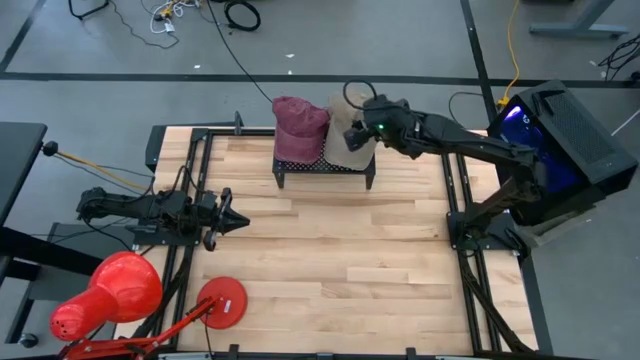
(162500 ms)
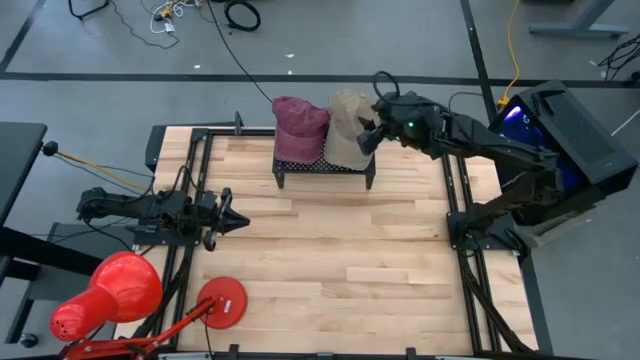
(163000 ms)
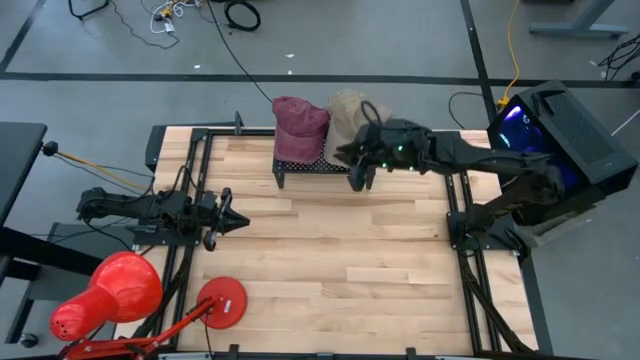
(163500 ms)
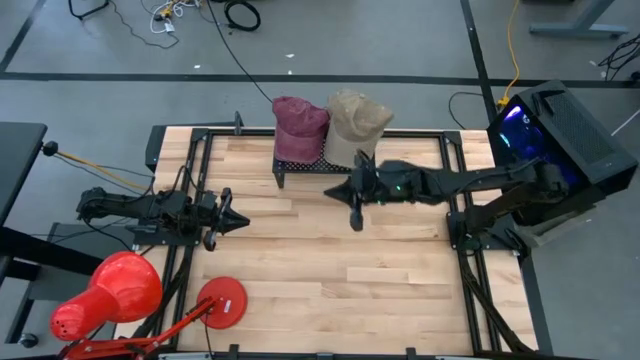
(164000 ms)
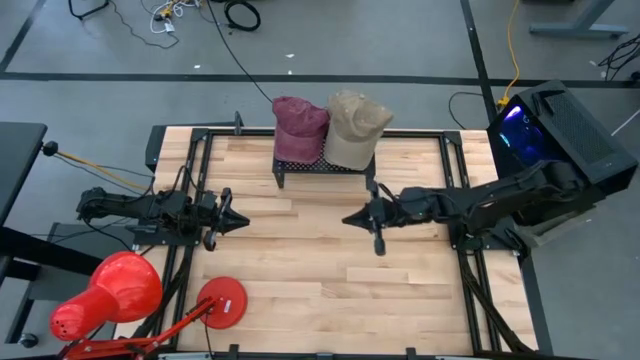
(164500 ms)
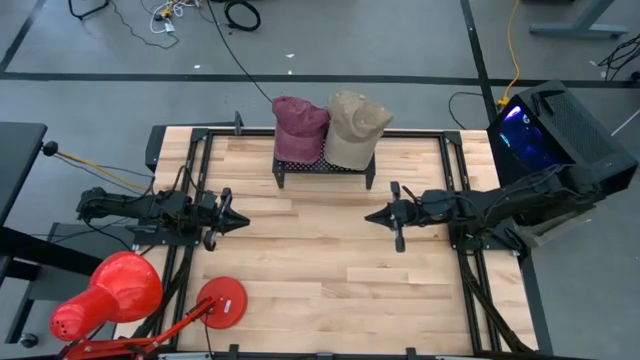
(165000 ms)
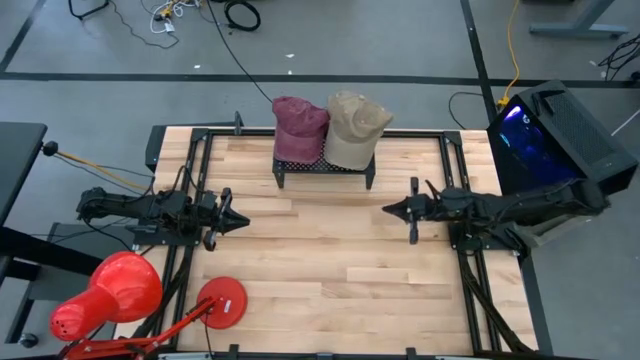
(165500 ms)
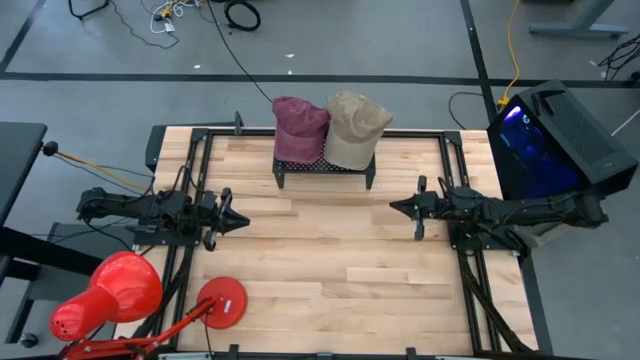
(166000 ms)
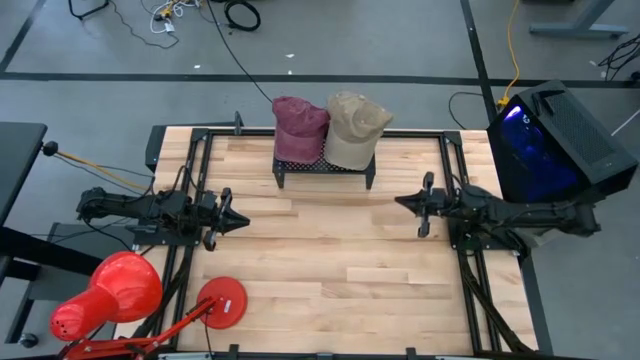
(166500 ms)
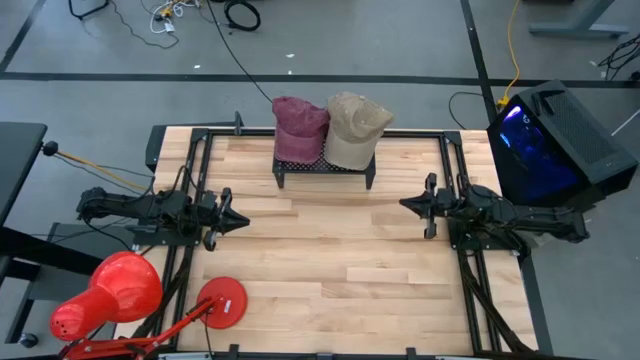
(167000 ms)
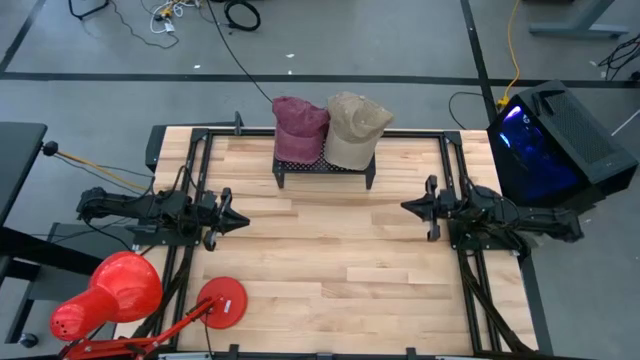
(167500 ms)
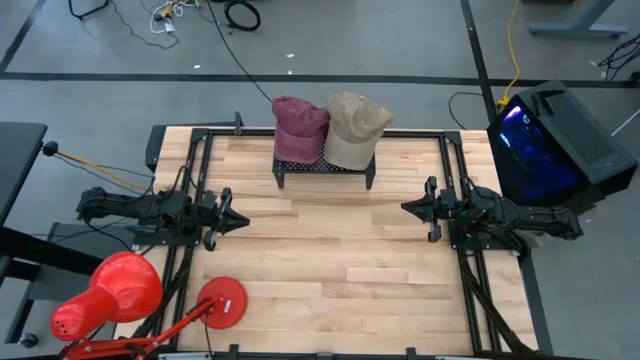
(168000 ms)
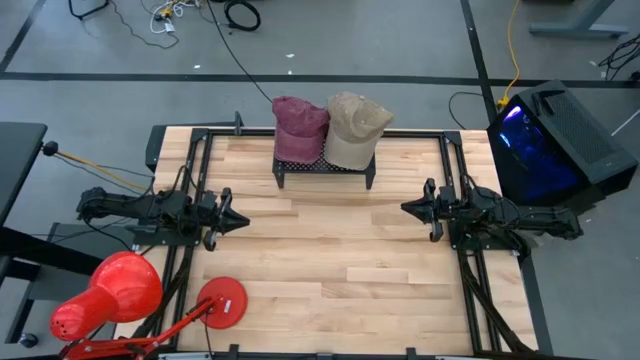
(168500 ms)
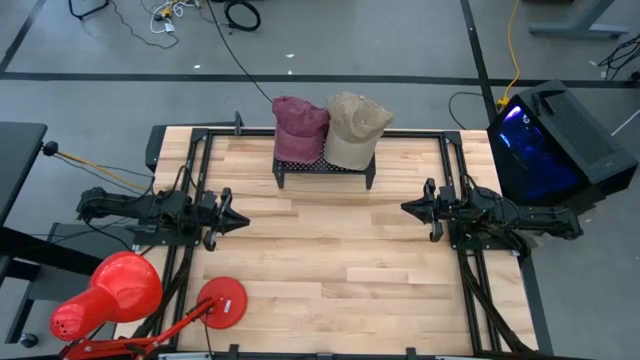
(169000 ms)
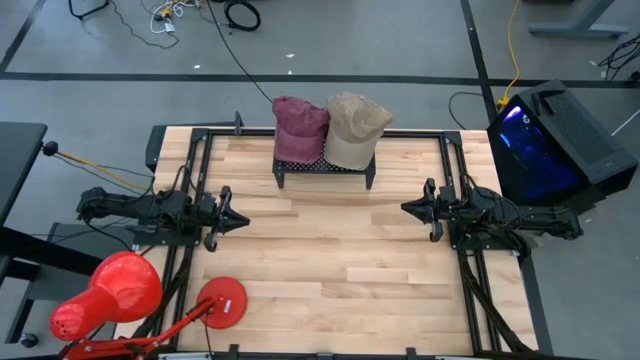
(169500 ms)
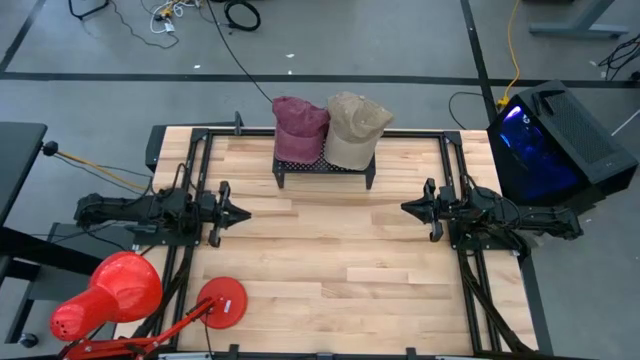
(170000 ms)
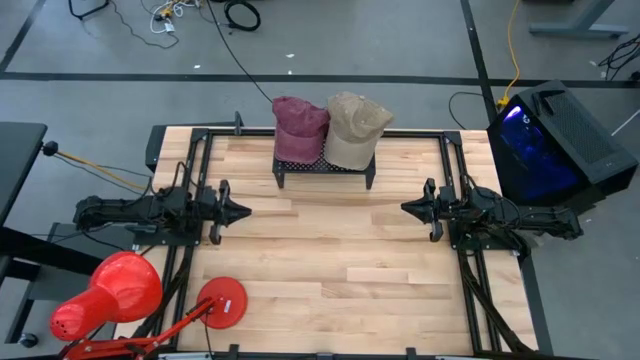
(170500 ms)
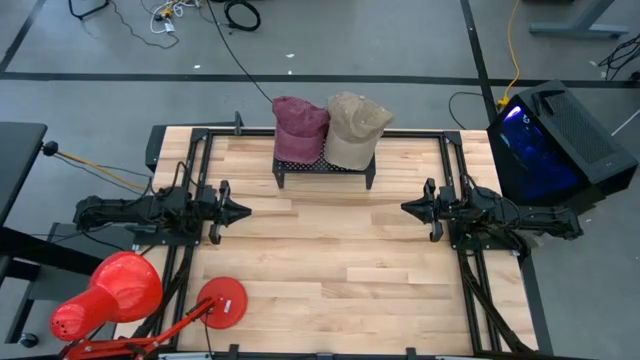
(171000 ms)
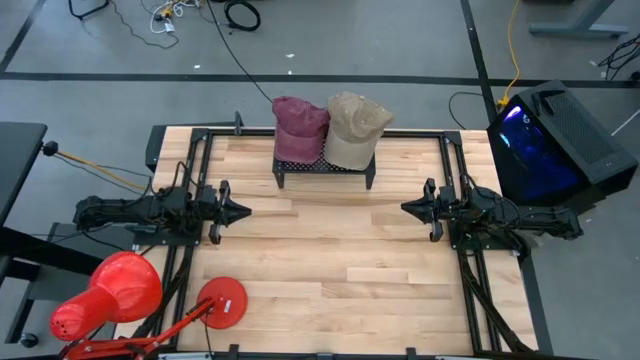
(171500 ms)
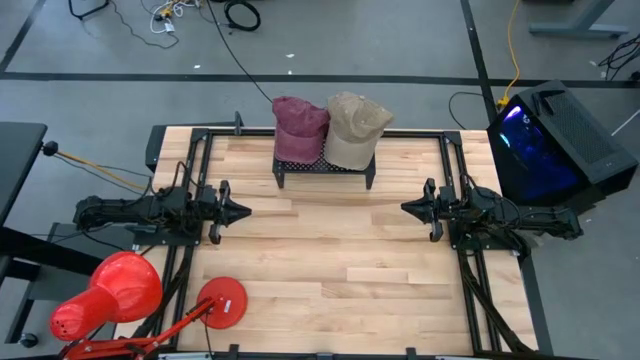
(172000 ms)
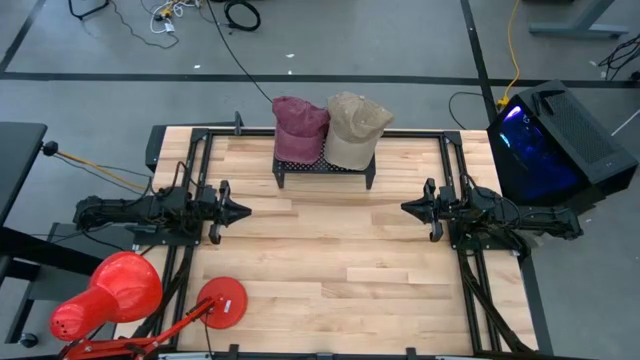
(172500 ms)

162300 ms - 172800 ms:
Task: Pick & Place hat
Return to Home Position

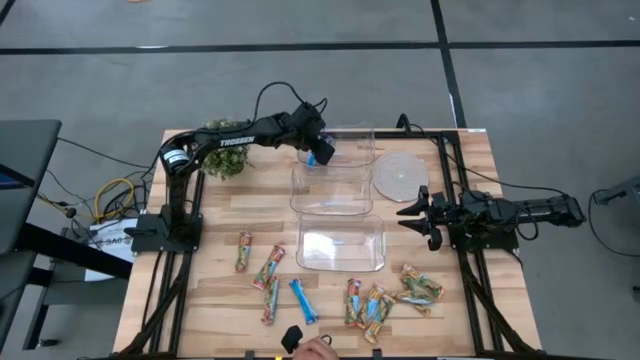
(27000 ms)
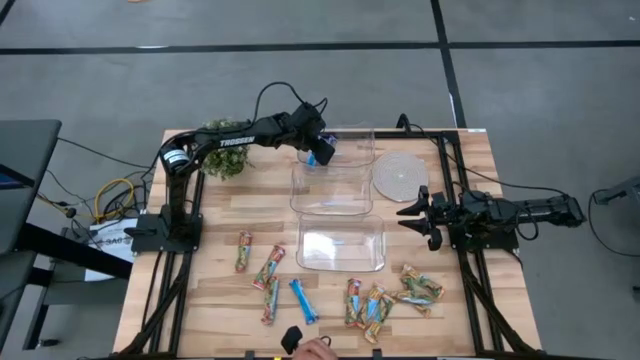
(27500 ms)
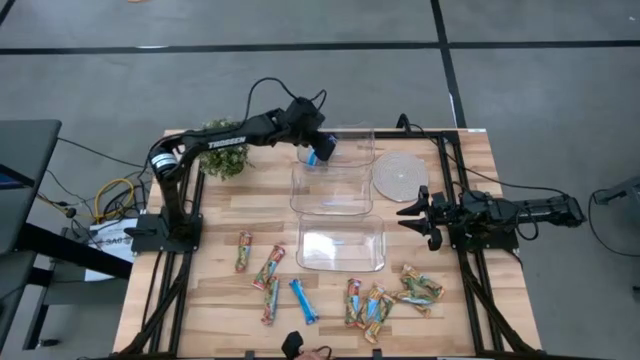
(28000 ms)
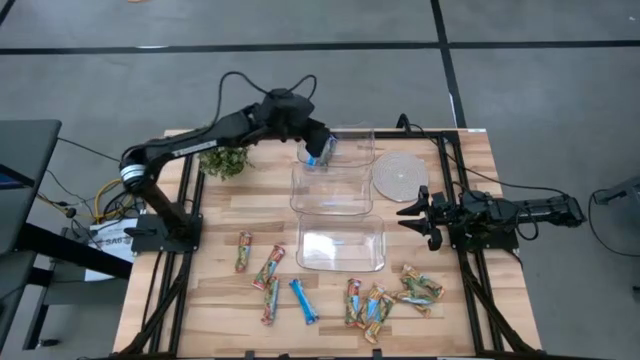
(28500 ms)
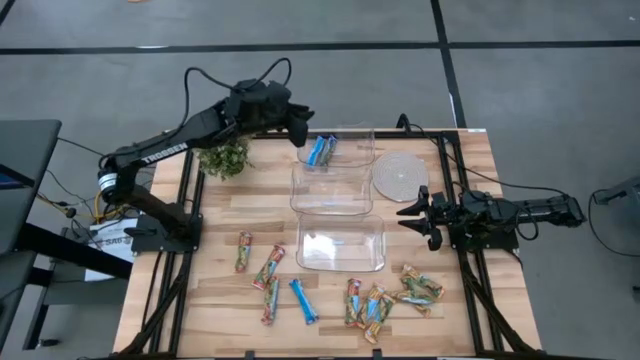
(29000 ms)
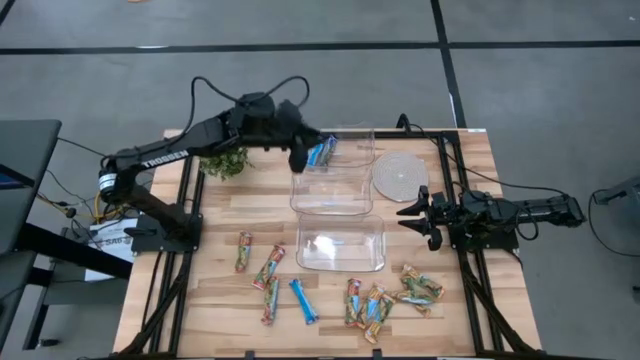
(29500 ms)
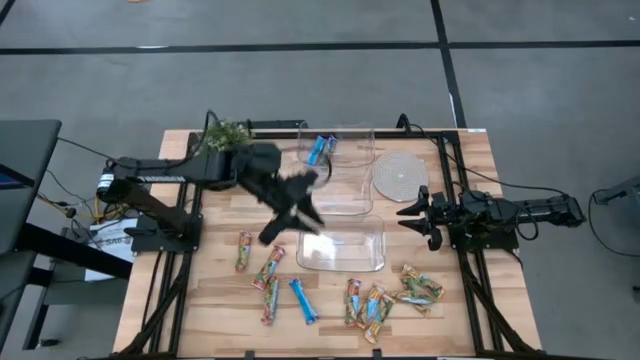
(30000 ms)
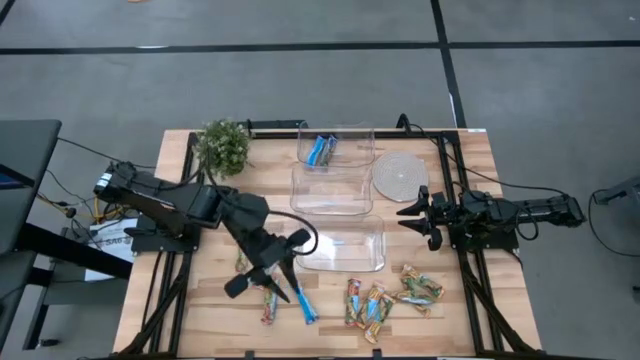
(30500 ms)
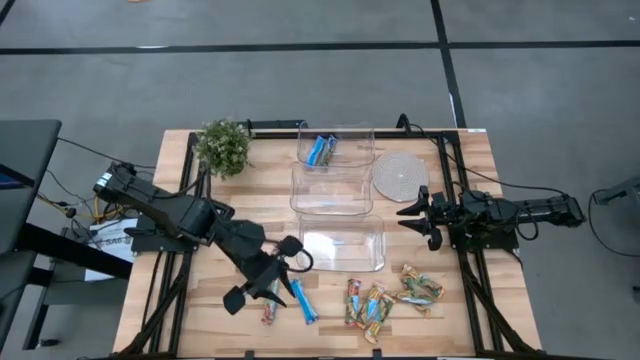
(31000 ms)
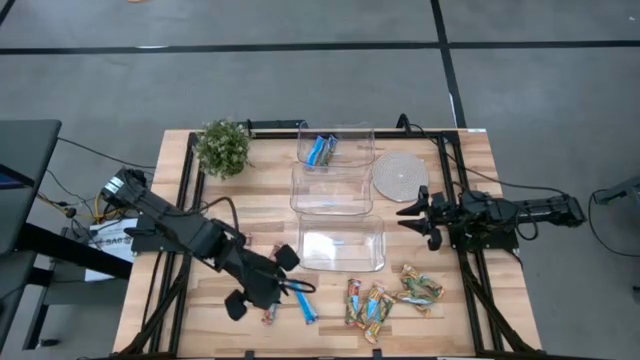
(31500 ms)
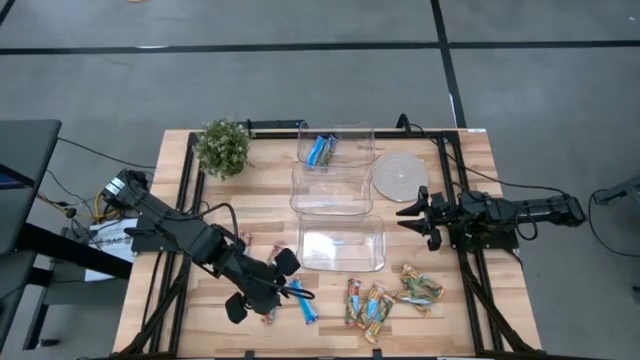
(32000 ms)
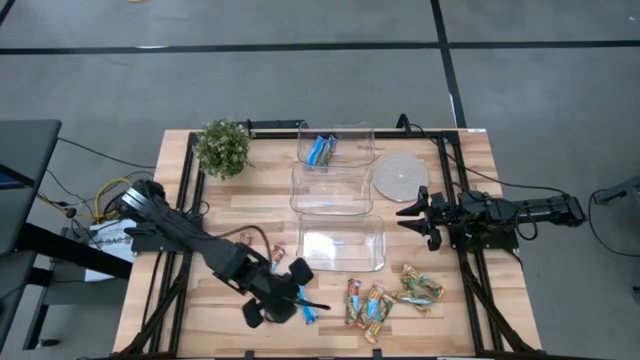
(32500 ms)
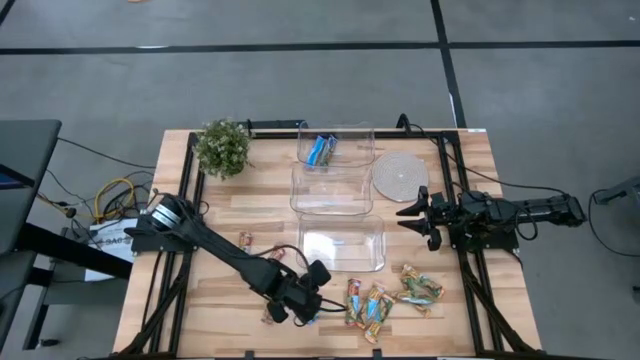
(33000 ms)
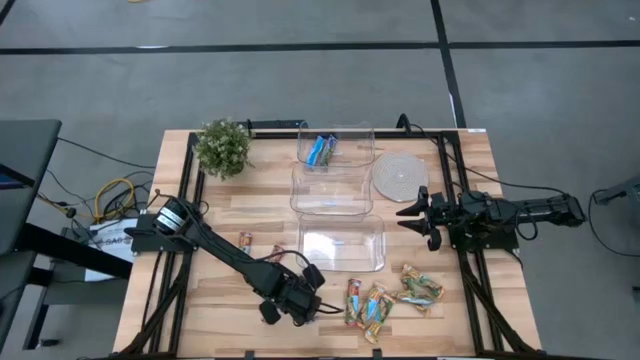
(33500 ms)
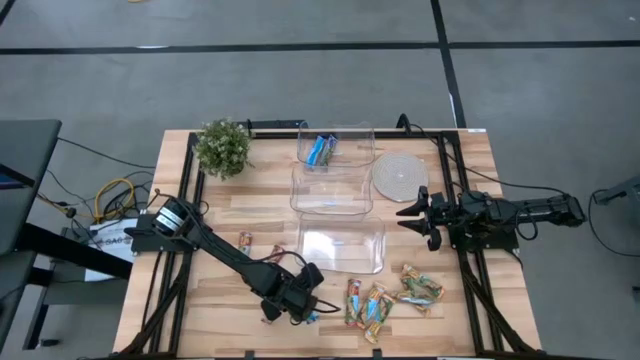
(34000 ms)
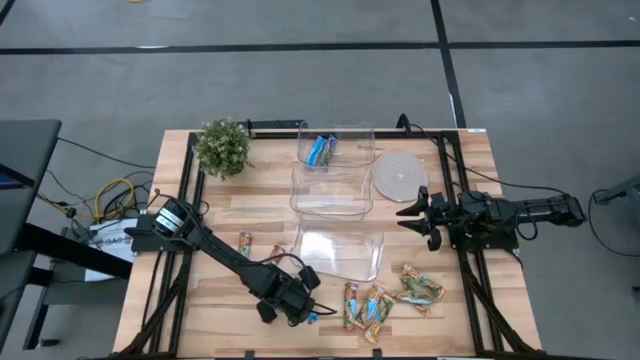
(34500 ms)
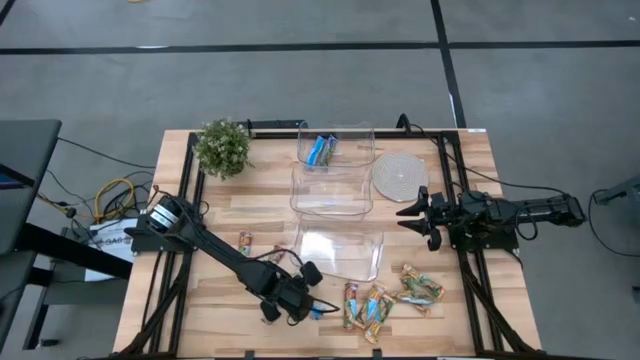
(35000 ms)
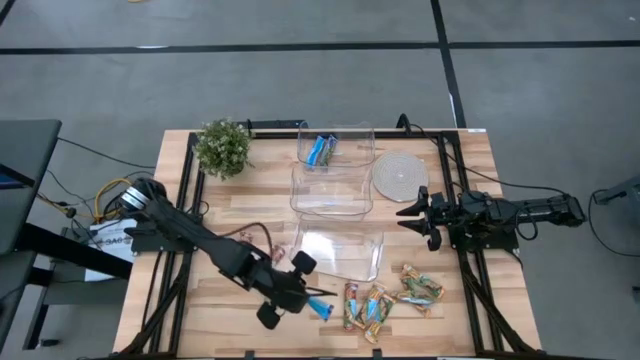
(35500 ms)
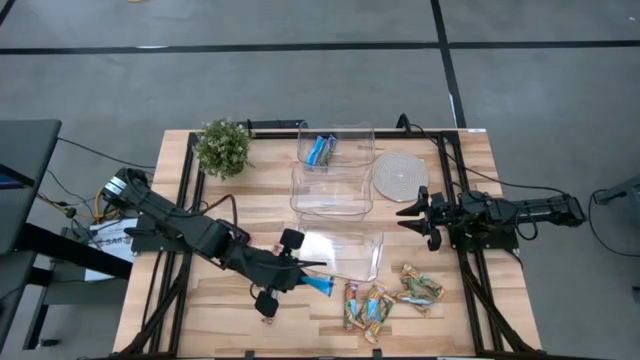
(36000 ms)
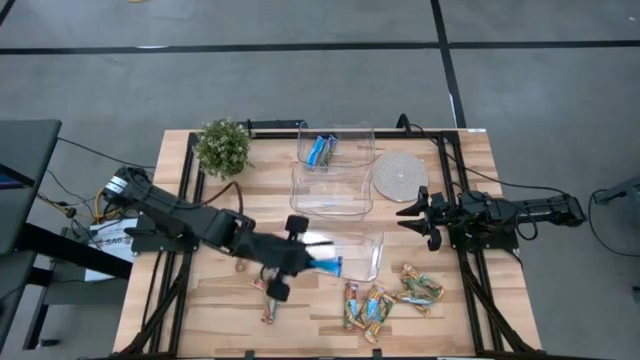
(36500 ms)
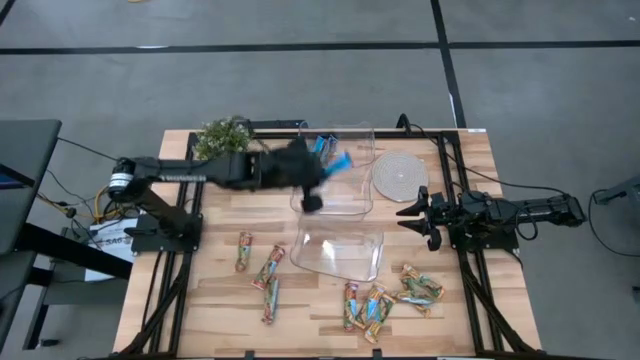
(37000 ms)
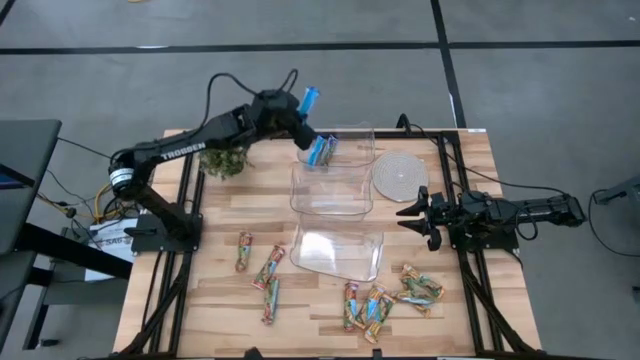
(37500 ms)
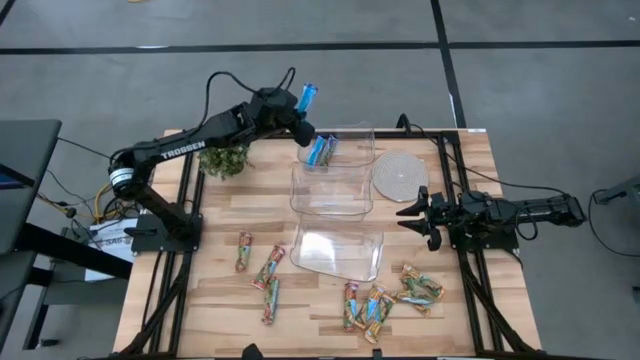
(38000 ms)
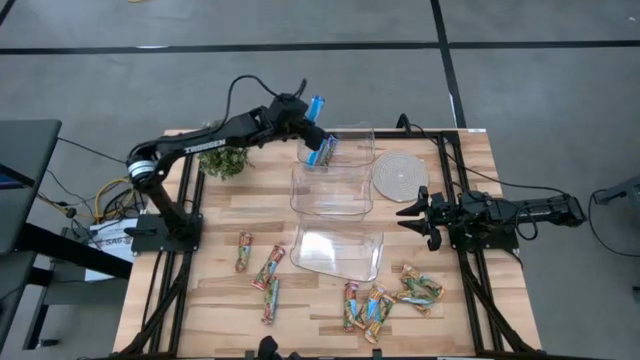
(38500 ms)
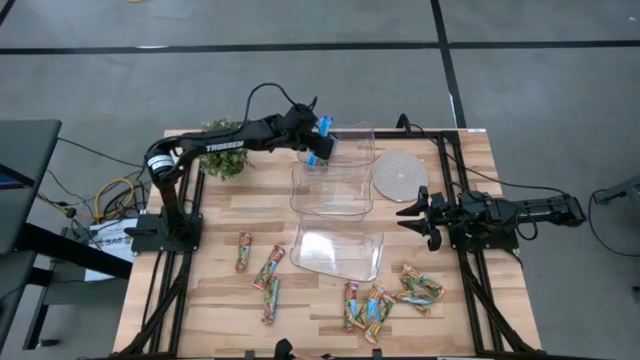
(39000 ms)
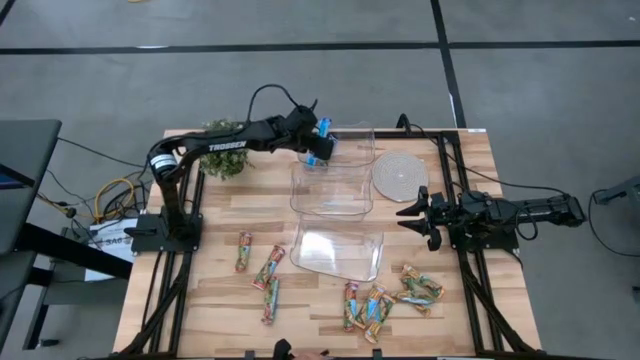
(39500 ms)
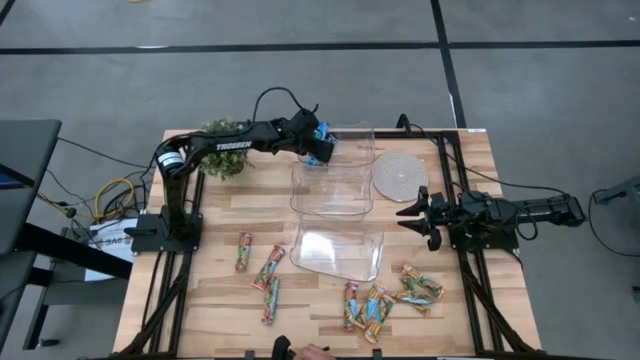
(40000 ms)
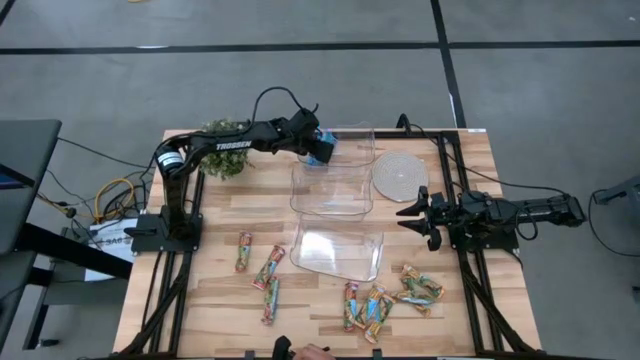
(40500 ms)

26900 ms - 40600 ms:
Task: Pick and place Granola Bars by type
Put the blue granola bar into the top transparent bin
